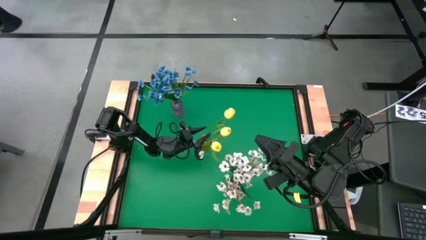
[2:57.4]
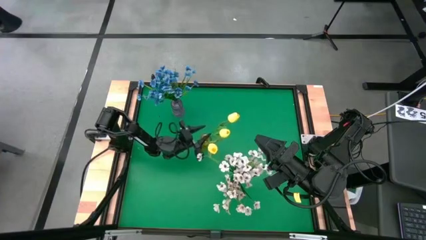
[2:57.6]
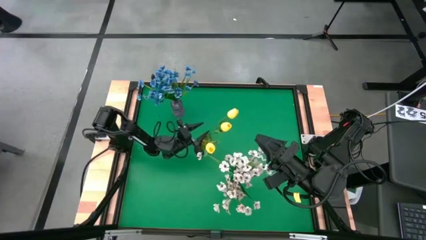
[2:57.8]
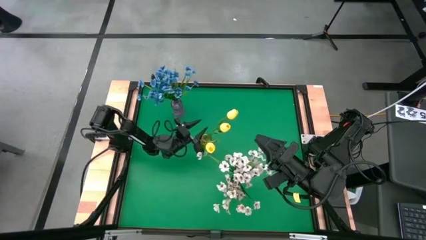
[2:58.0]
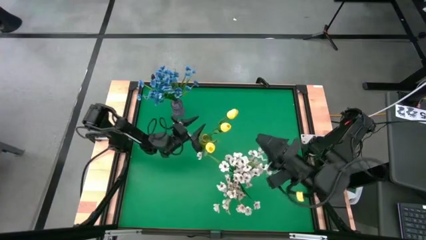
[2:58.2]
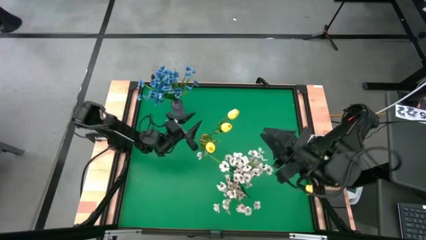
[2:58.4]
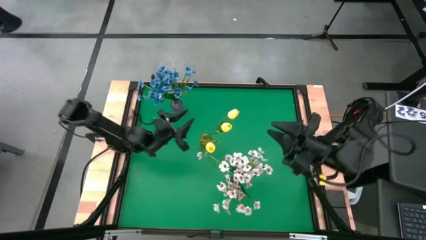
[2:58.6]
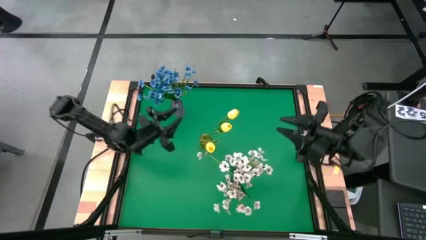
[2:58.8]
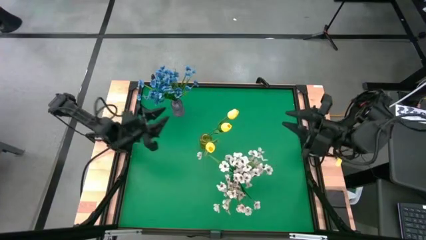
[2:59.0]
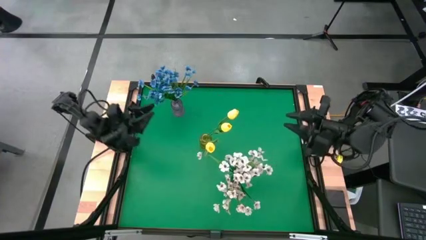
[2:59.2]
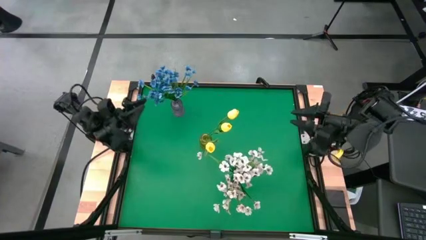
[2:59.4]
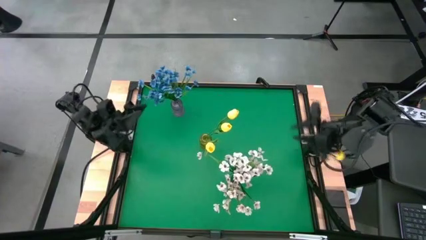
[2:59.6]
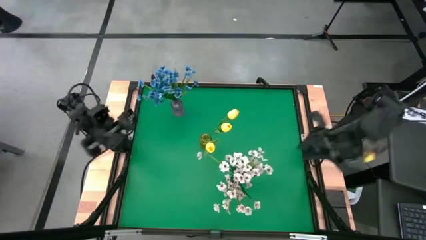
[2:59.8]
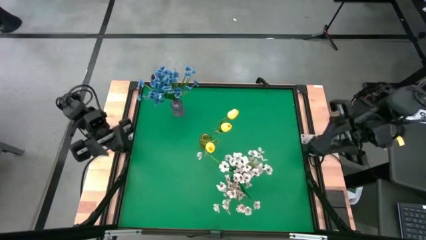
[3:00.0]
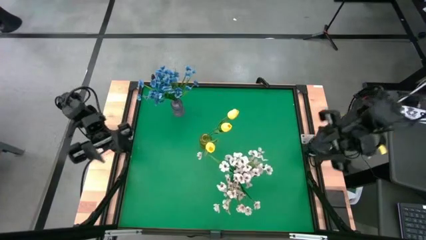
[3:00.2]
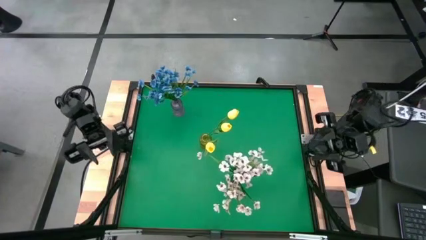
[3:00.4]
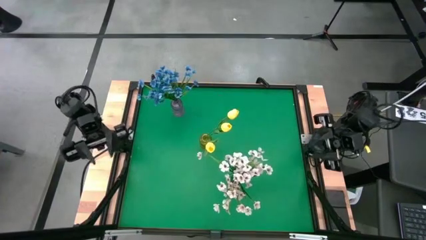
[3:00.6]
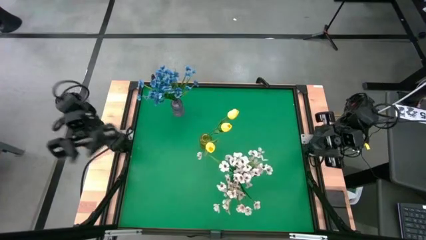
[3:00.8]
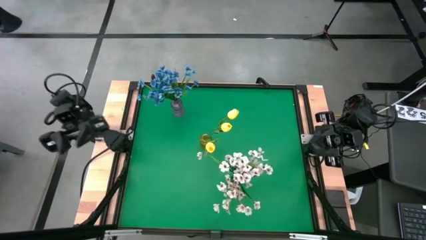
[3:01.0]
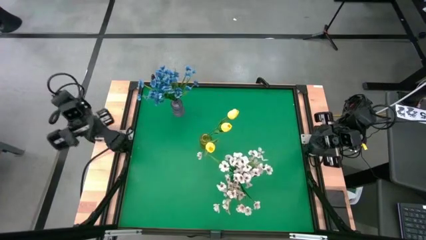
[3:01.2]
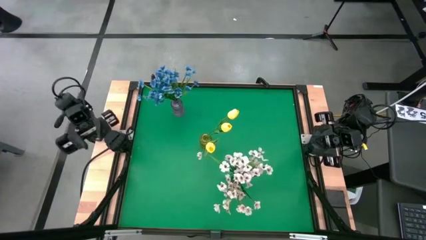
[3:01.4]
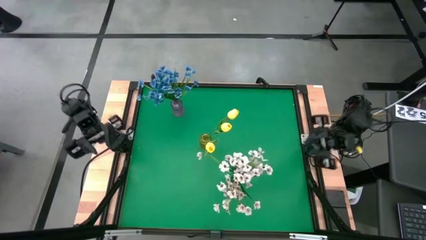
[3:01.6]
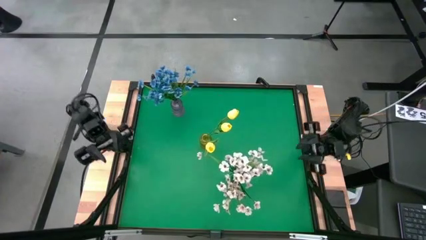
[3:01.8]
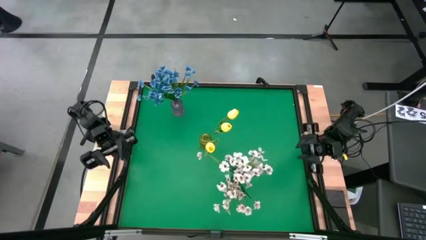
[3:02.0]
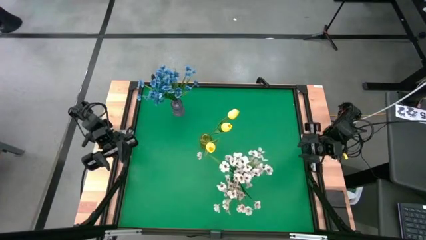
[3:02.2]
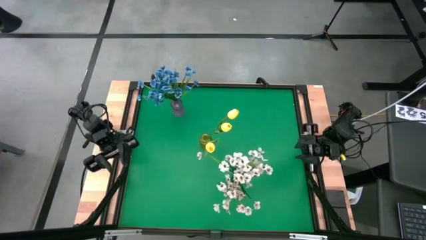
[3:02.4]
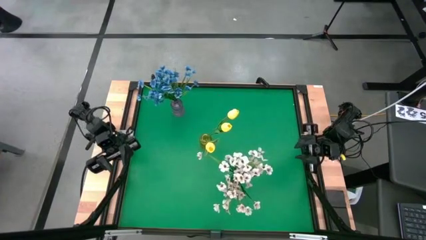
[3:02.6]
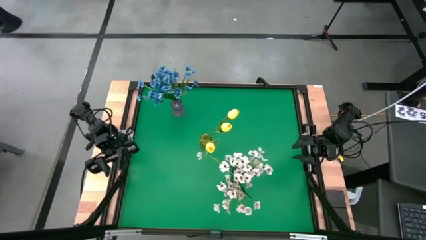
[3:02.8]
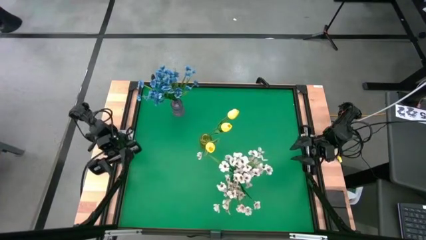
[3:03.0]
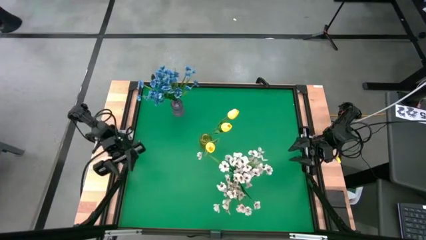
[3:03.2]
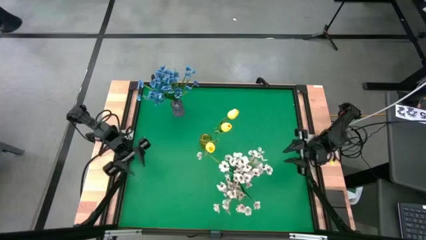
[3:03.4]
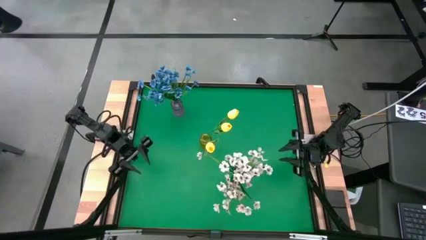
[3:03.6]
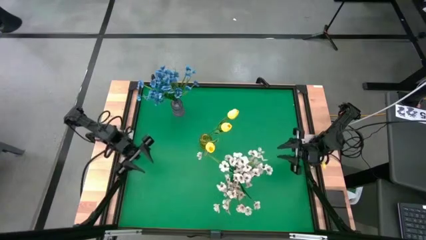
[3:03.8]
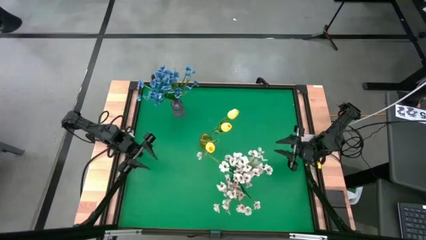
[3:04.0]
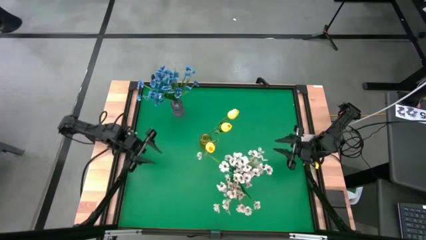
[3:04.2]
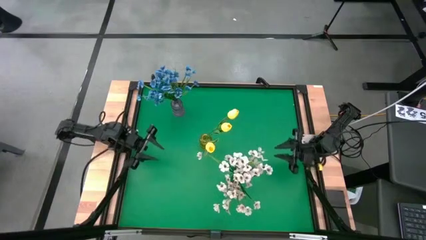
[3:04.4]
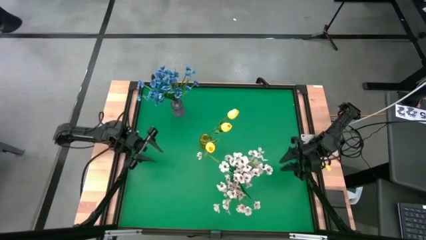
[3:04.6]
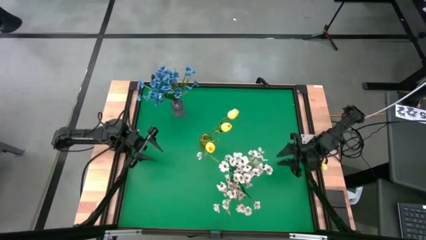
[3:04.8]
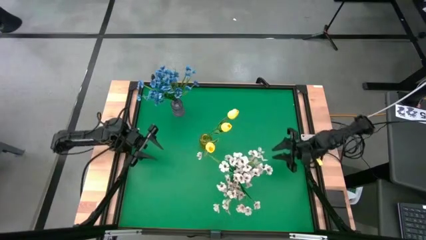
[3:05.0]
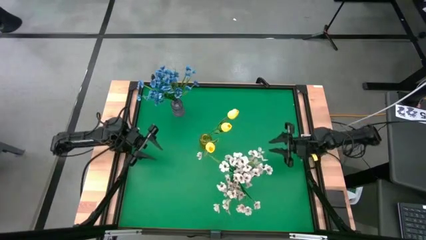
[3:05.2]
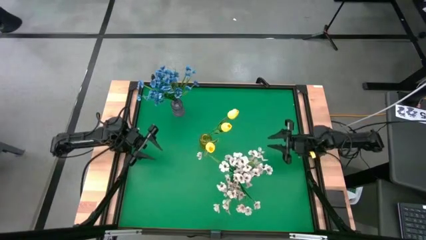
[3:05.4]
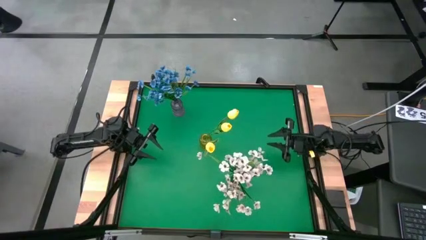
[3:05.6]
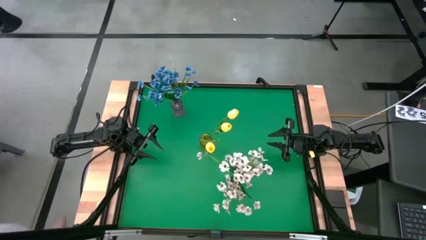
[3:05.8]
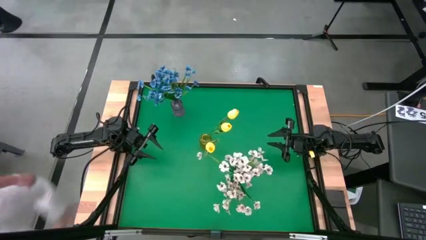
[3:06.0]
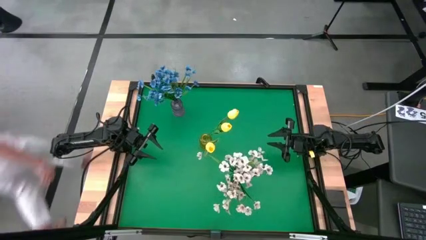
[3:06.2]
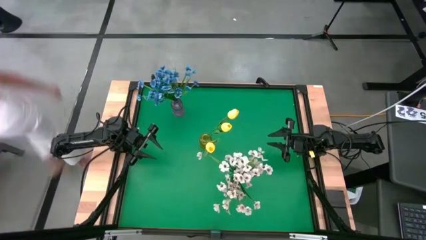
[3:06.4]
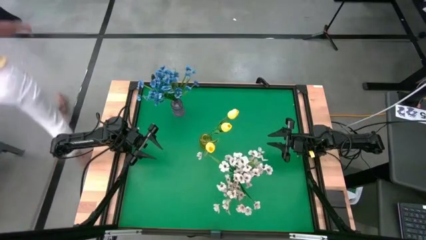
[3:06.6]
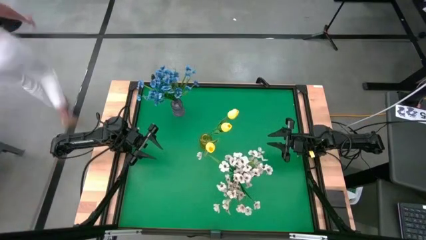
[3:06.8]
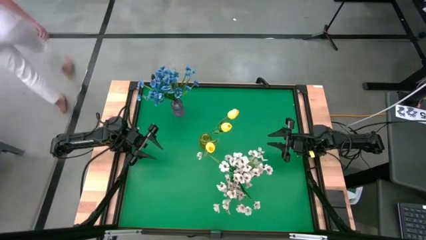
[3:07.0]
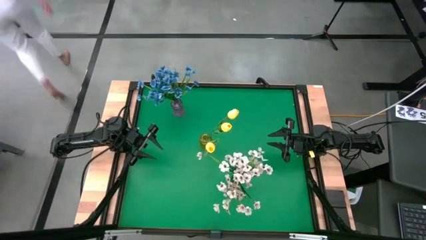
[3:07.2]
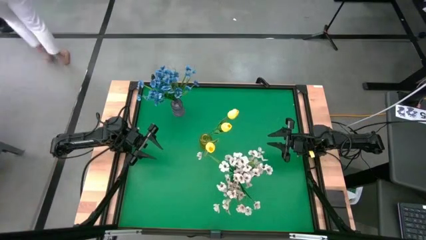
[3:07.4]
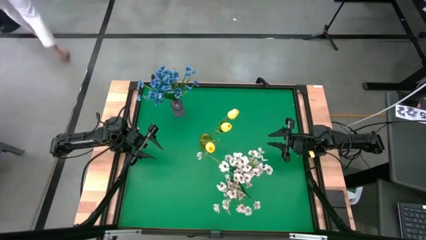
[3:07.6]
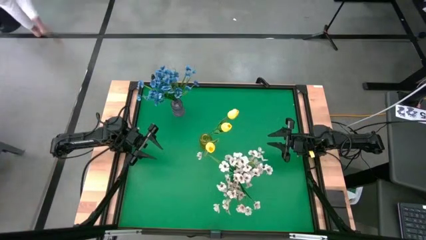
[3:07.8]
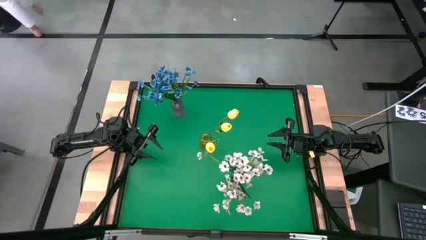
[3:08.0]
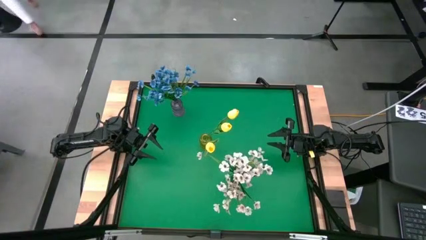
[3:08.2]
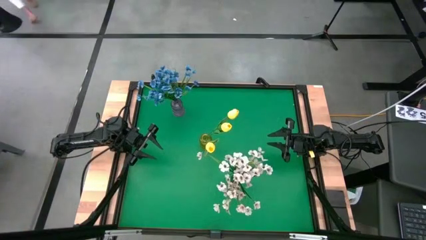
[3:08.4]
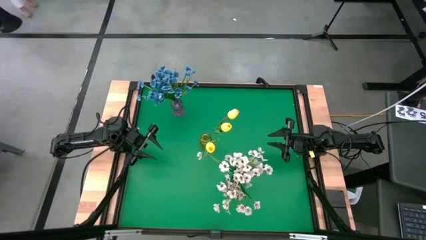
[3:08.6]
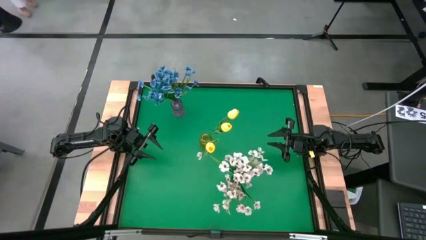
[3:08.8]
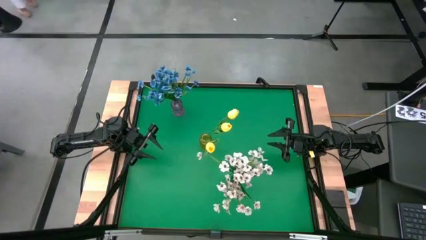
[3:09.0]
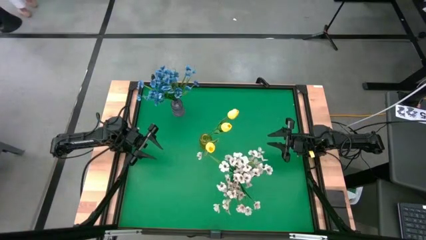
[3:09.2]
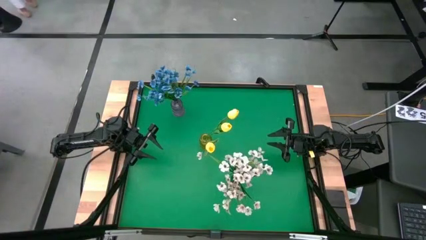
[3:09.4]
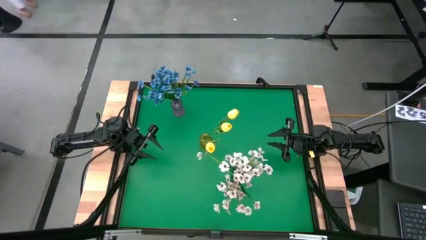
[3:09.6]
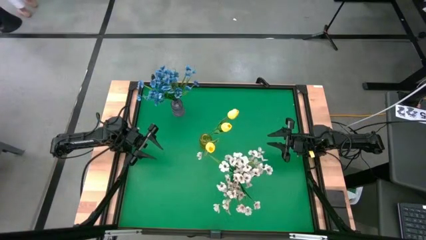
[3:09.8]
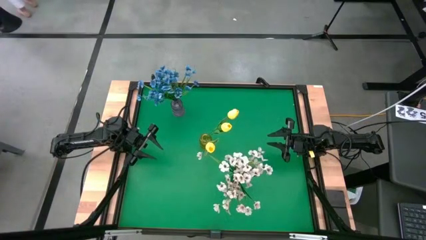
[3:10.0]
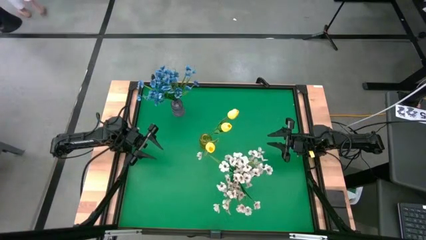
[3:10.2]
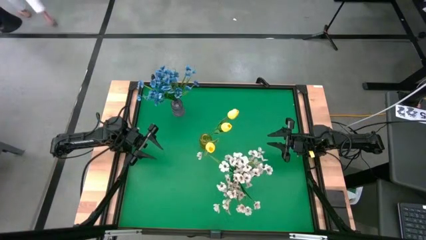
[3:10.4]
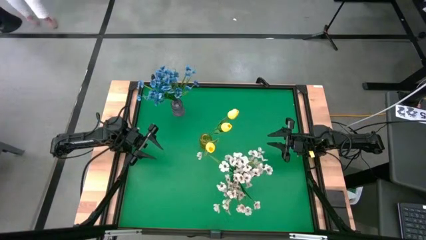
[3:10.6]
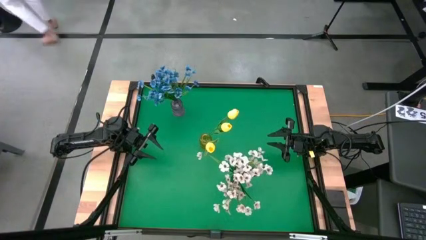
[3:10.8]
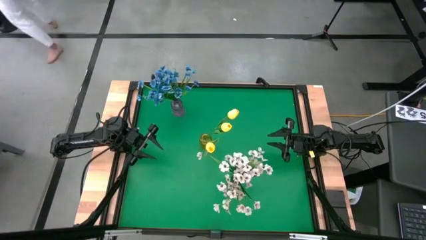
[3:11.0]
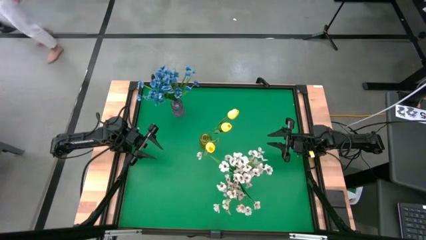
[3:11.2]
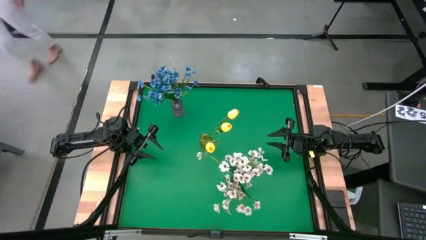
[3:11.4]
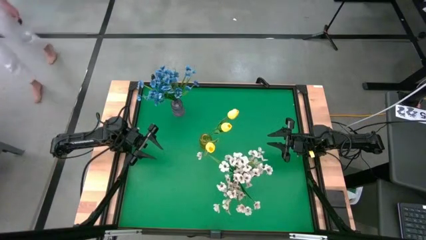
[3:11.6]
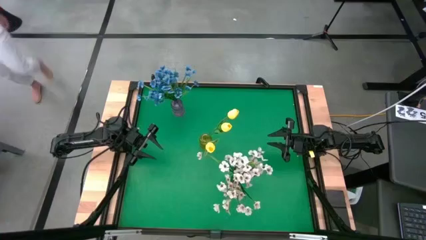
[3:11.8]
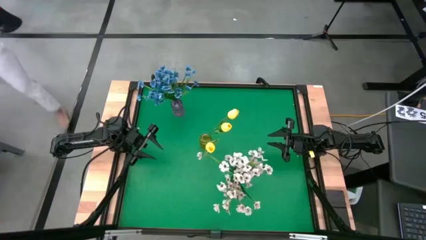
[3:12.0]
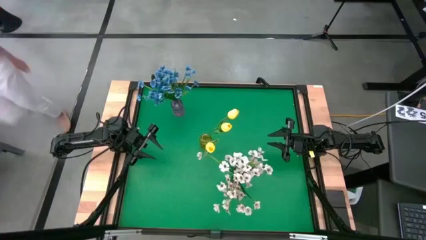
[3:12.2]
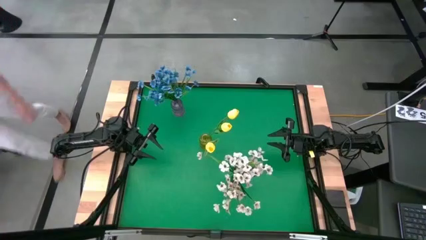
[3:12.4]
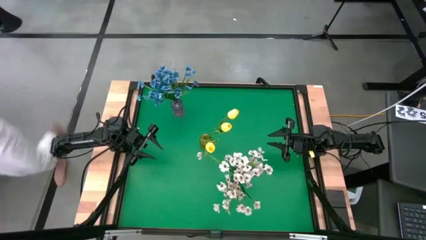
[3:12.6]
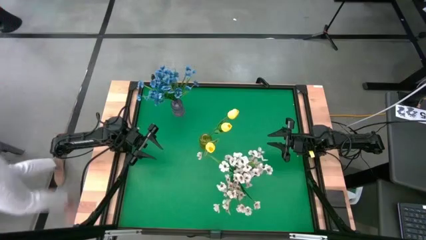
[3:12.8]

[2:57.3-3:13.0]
Task: Sort flowers into vase by color
Return to Home Position

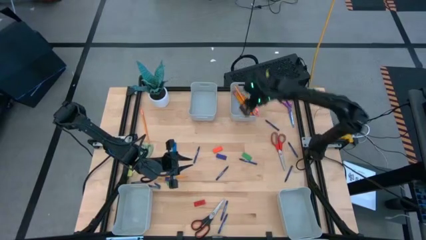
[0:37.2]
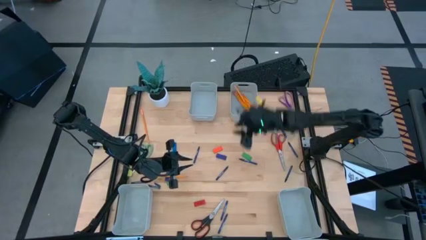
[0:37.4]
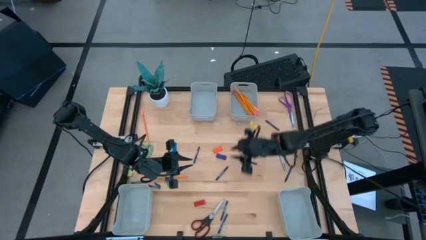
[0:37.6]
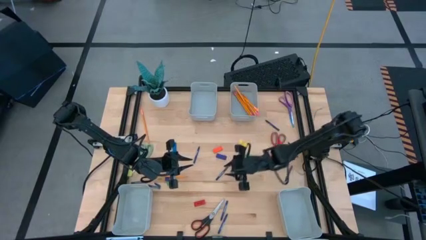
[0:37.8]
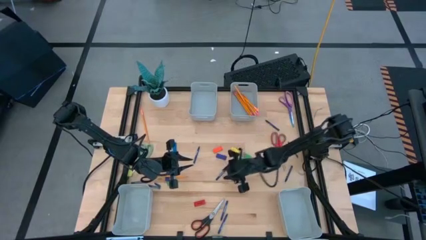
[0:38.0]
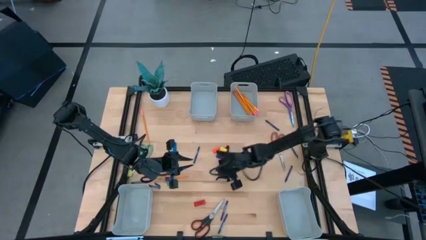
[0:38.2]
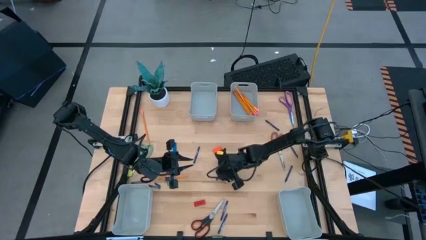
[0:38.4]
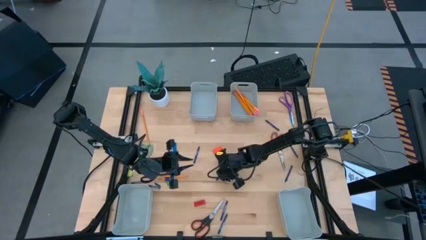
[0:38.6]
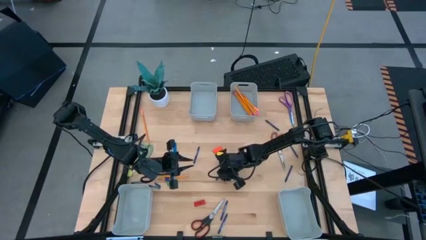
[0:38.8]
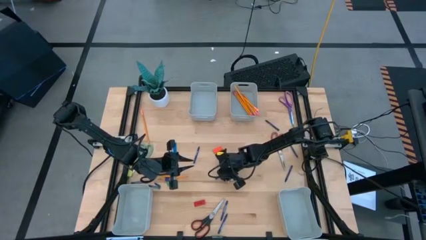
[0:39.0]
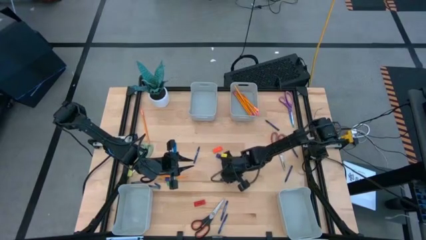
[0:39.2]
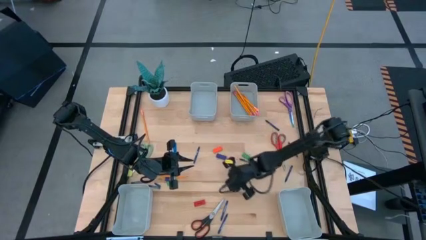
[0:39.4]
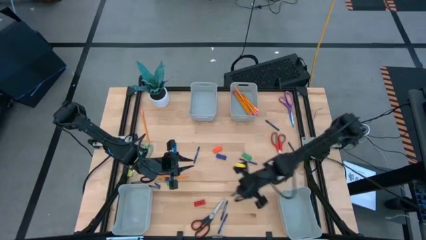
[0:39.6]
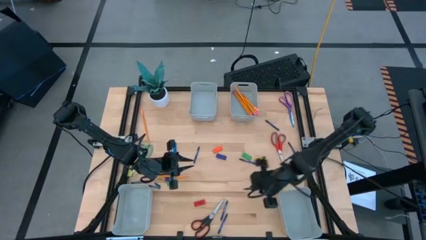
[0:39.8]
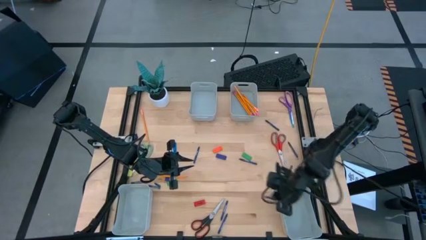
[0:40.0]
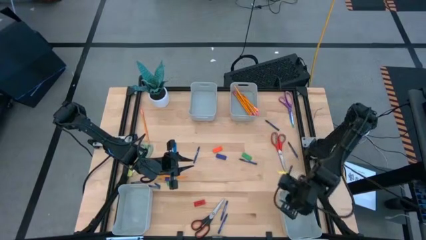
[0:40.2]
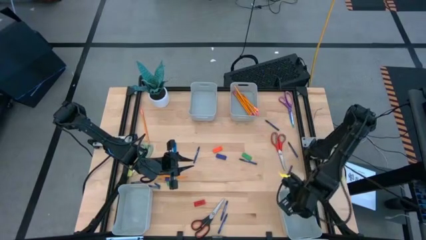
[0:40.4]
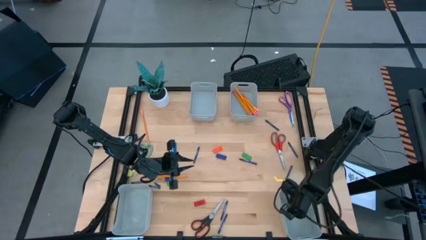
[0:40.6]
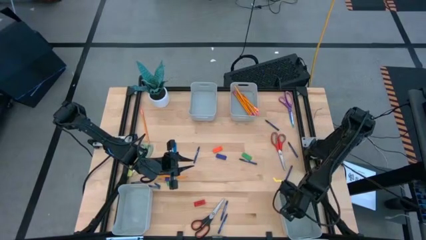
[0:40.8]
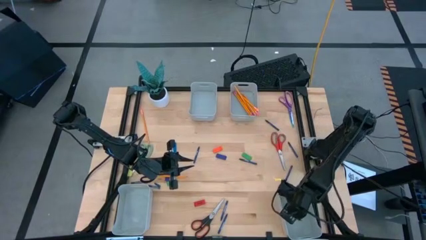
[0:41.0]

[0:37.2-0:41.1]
Task: Sort crayons/erasers/pens/pencils in bins
Put the blue crayon into the bottom right bin
